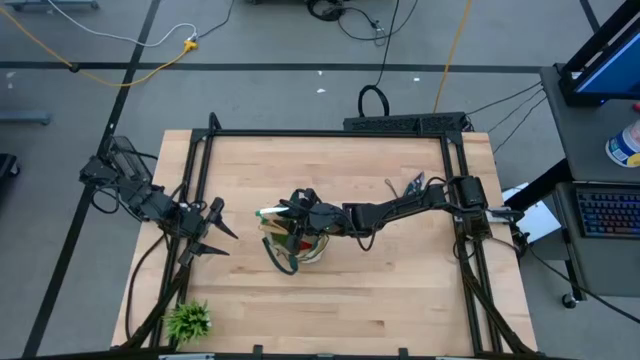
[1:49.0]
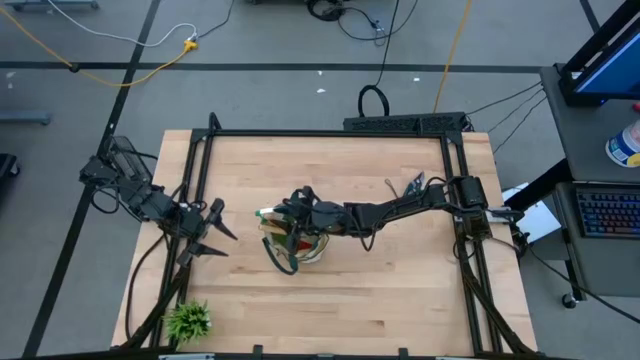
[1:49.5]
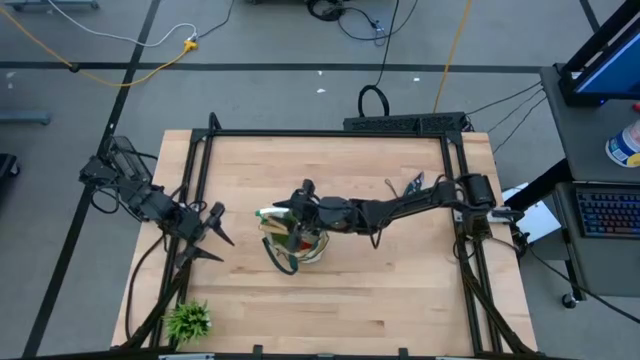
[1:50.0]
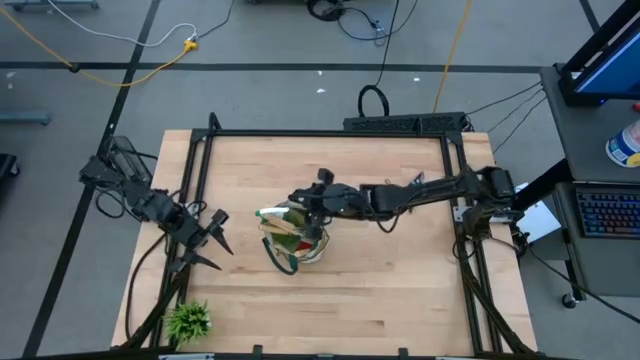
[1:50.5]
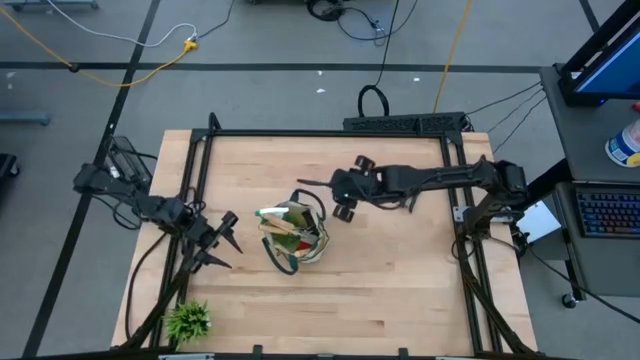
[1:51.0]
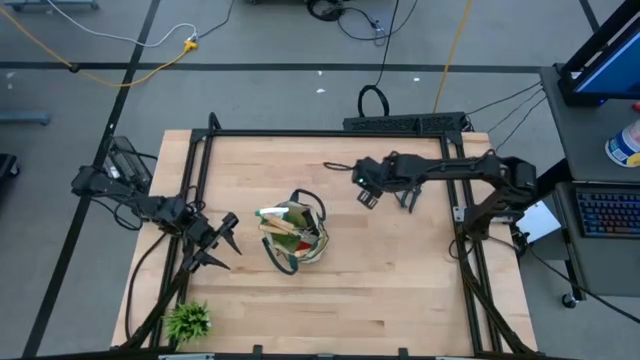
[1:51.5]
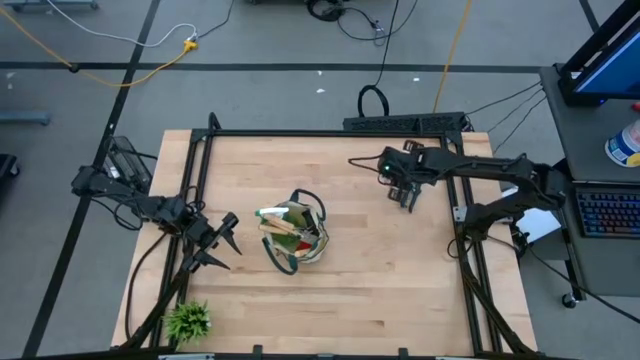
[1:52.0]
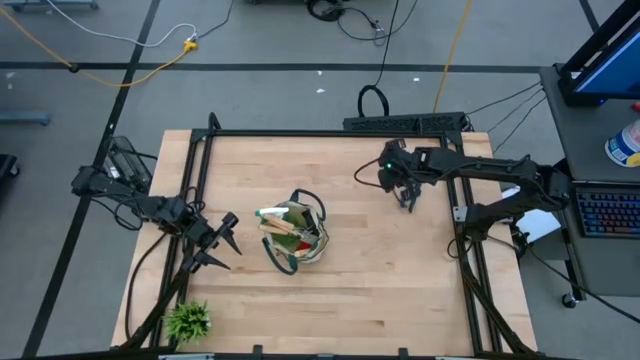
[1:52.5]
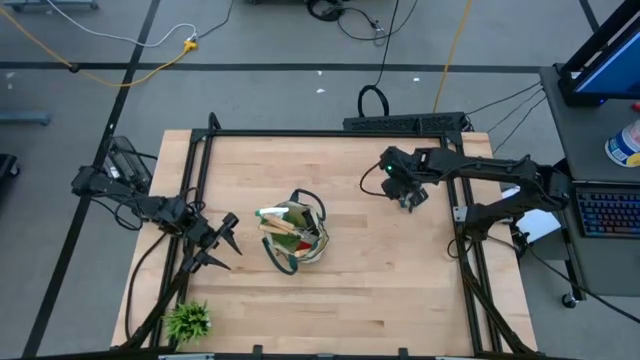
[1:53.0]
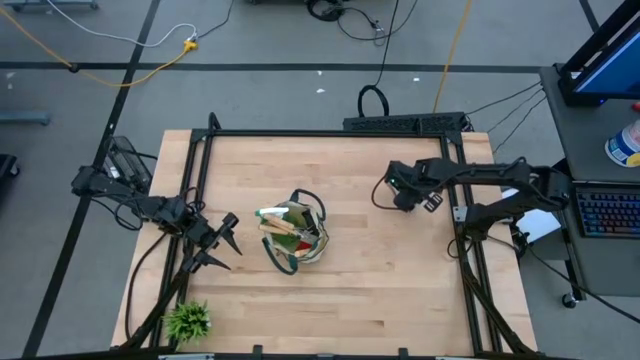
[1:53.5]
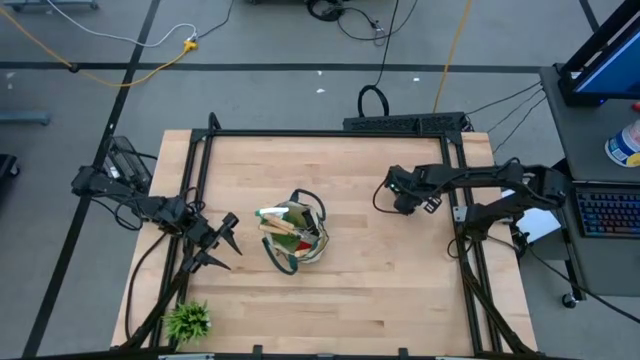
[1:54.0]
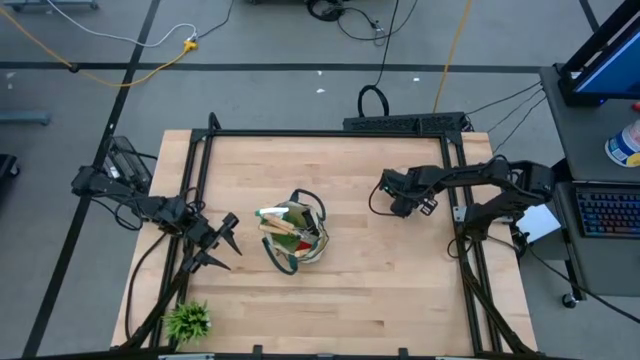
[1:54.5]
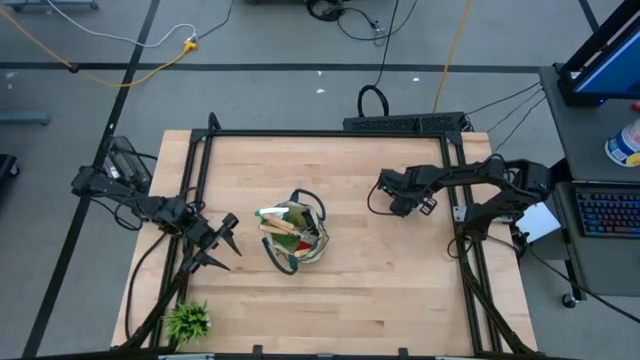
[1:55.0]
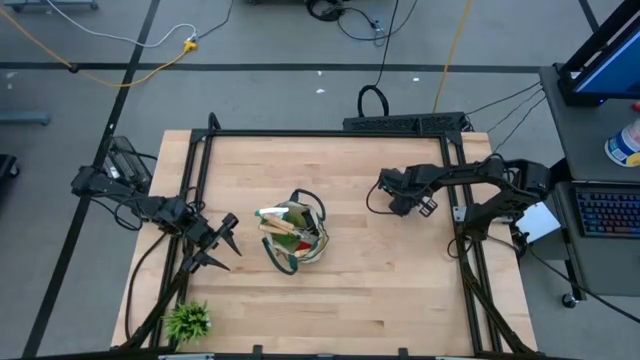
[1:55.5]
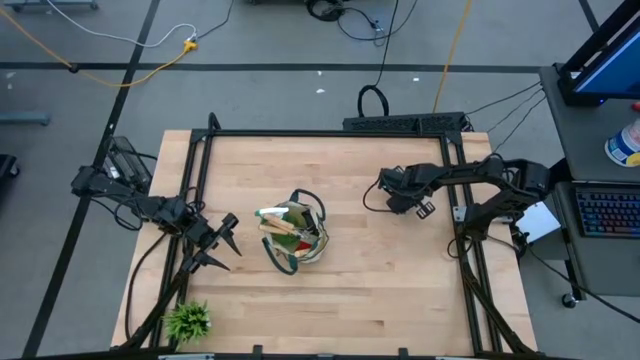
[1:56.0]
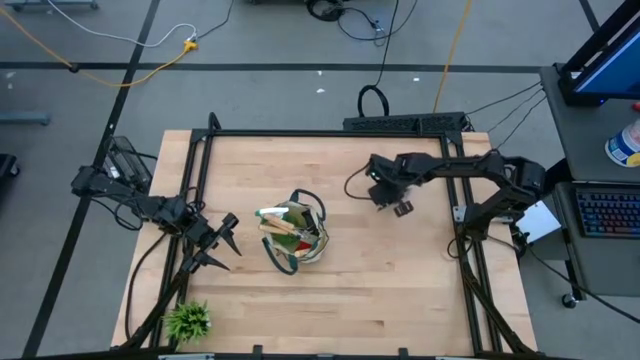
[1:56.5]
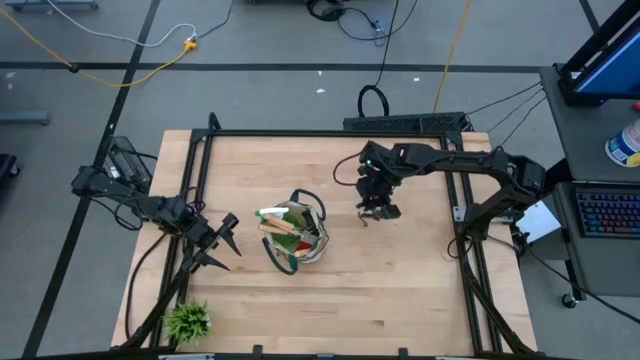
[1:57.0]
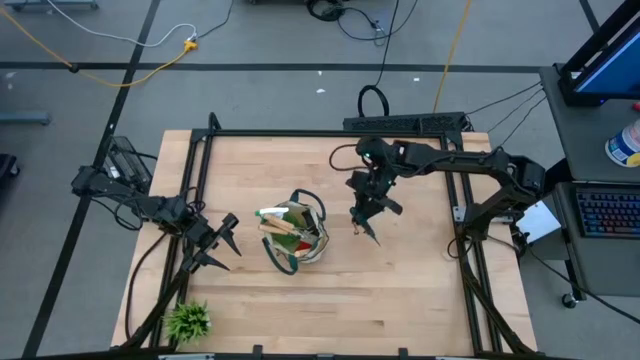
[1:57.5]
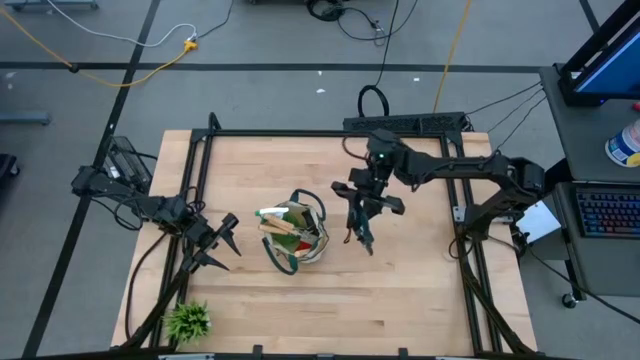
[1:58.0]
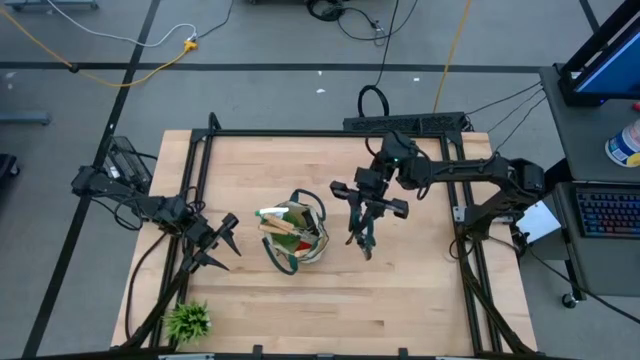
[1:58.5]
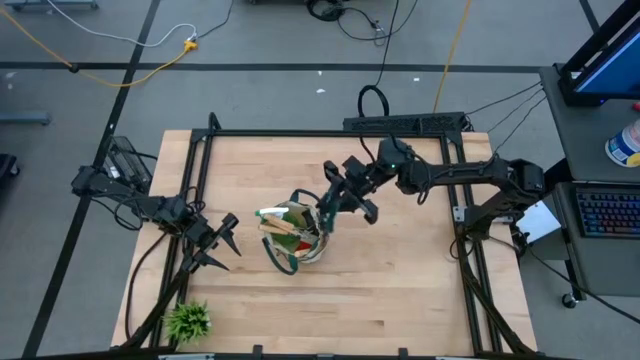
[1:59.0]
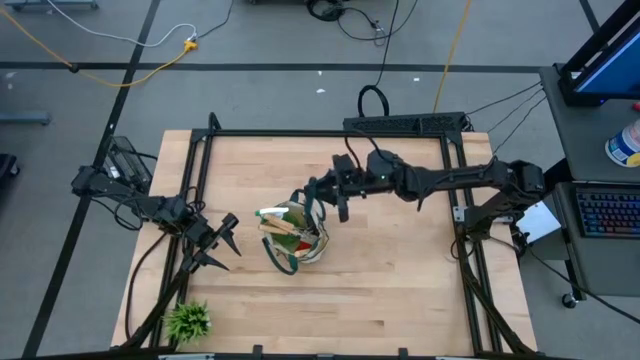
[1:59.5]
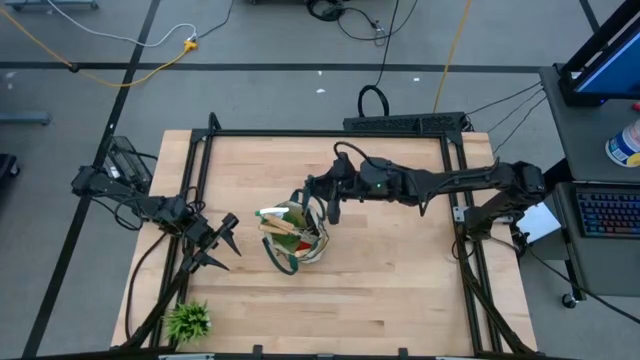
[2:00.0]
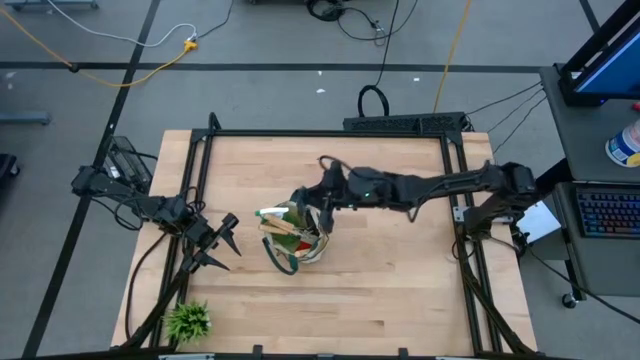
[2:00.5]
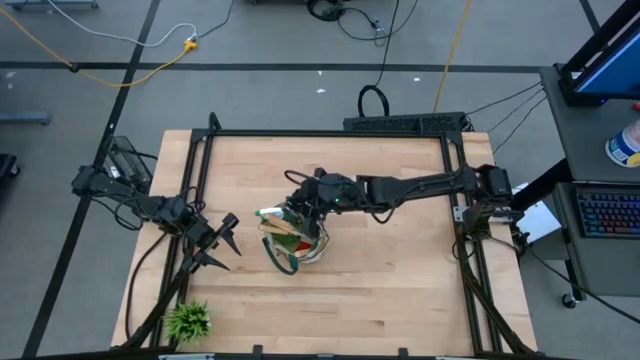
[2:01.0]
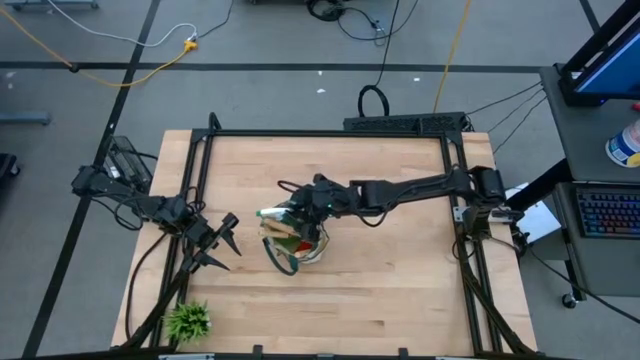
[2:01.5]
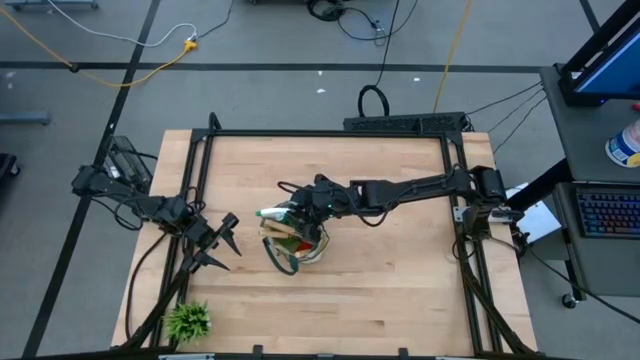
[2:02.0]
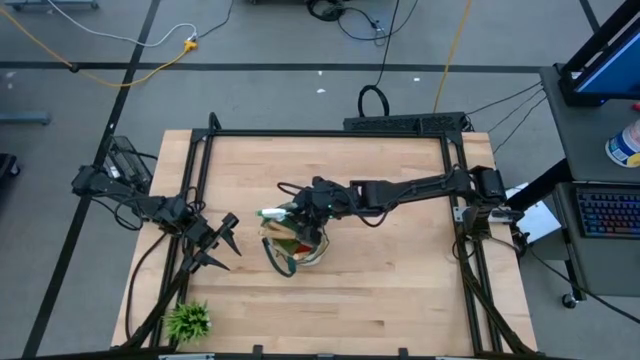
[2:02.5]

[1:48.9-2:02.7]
Task: Pick & Place Garden tools in Gardening bag
Put the shear scissors into the gardening bag

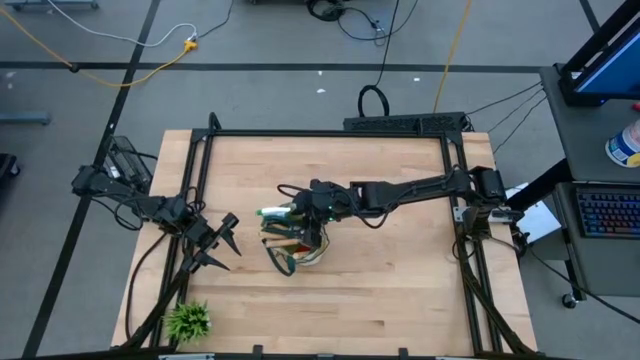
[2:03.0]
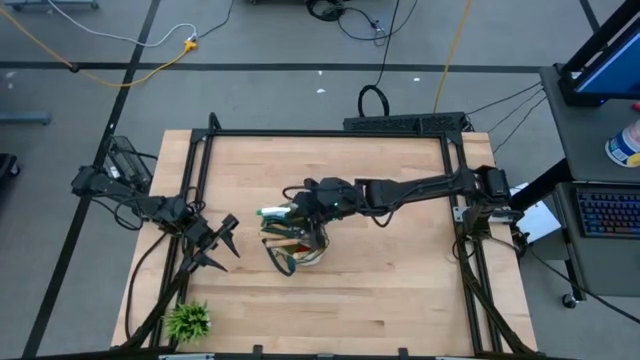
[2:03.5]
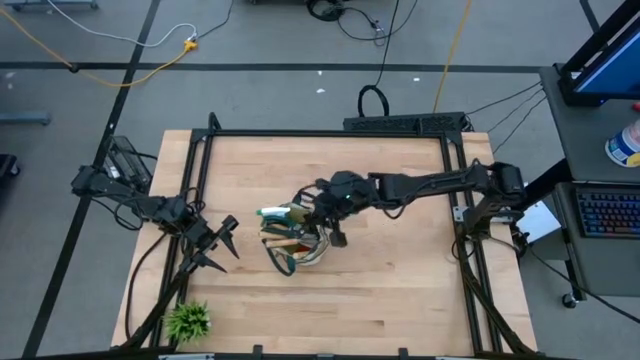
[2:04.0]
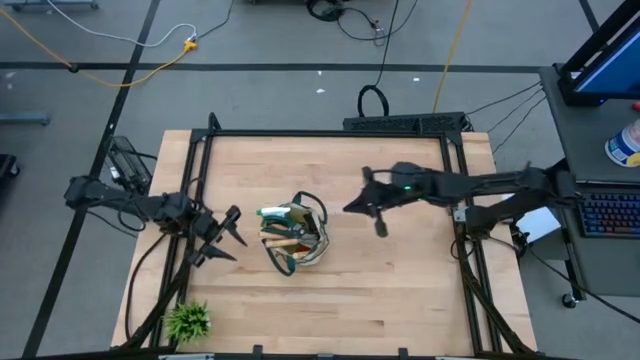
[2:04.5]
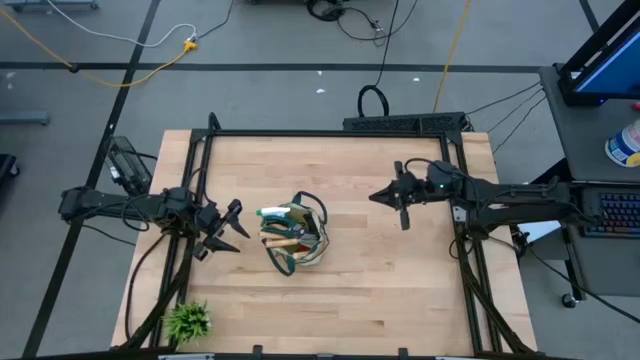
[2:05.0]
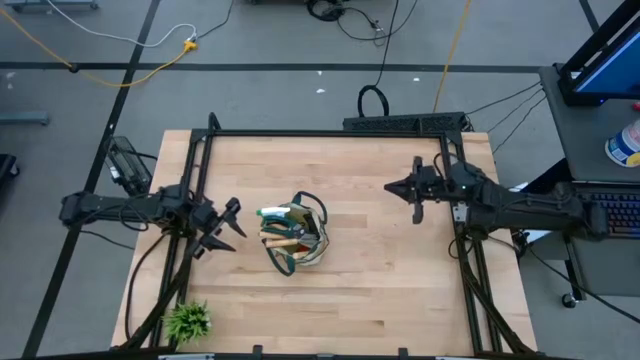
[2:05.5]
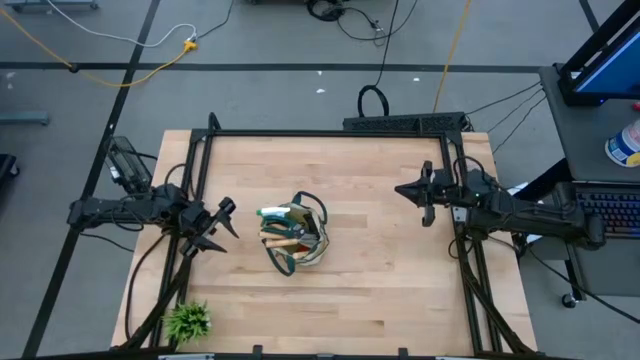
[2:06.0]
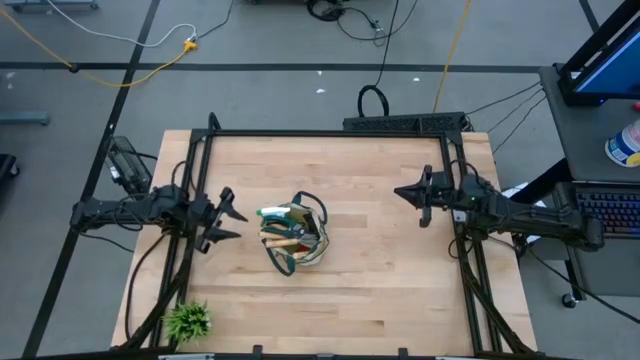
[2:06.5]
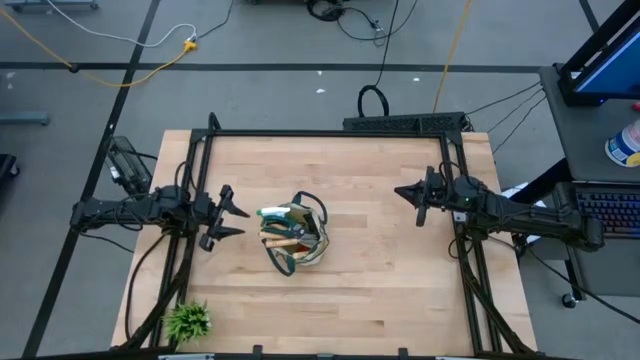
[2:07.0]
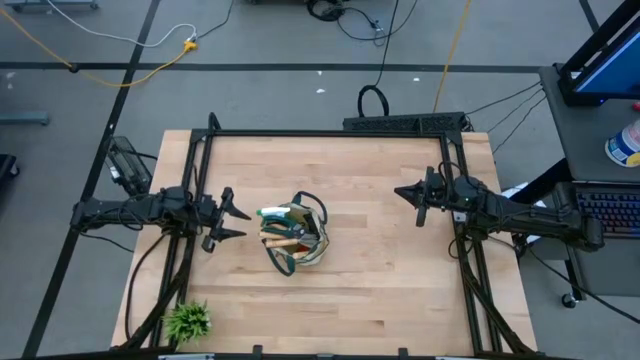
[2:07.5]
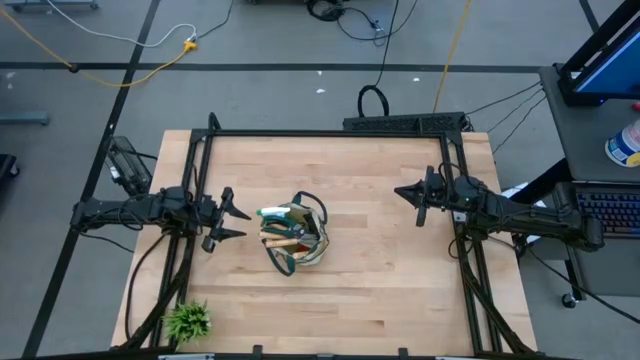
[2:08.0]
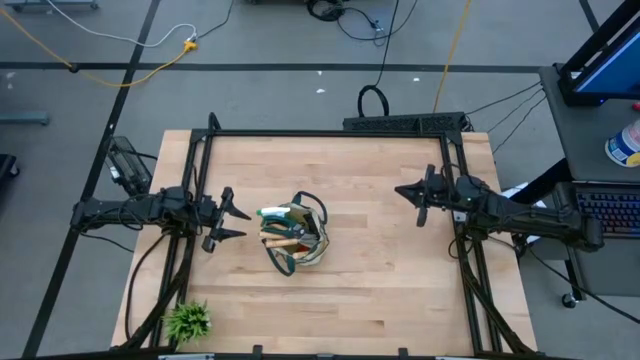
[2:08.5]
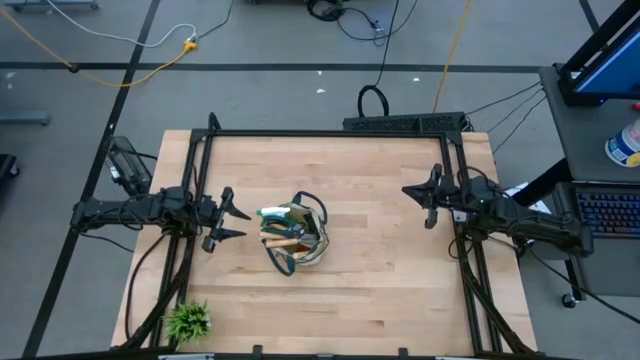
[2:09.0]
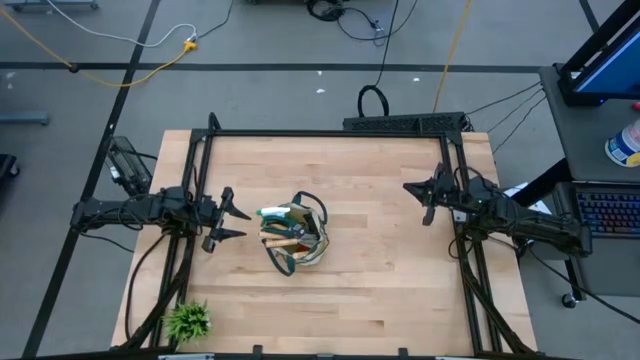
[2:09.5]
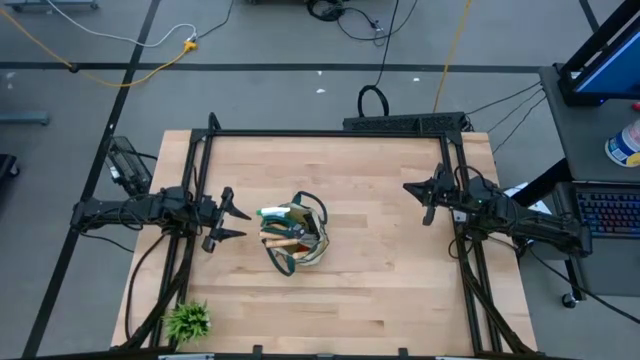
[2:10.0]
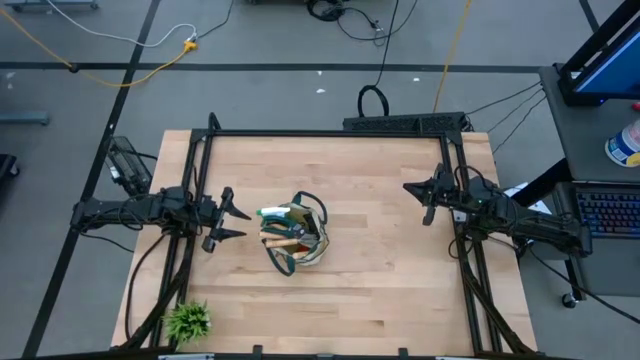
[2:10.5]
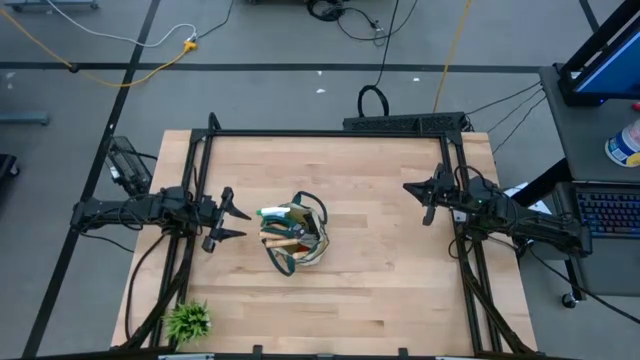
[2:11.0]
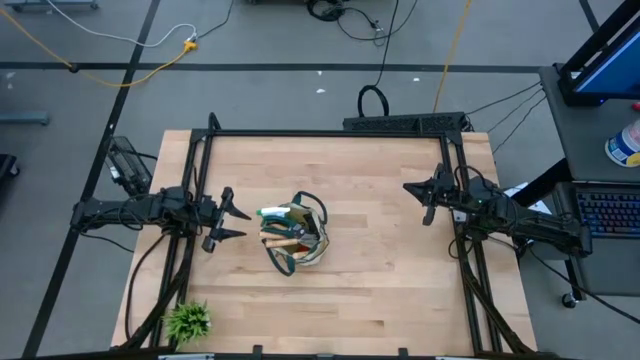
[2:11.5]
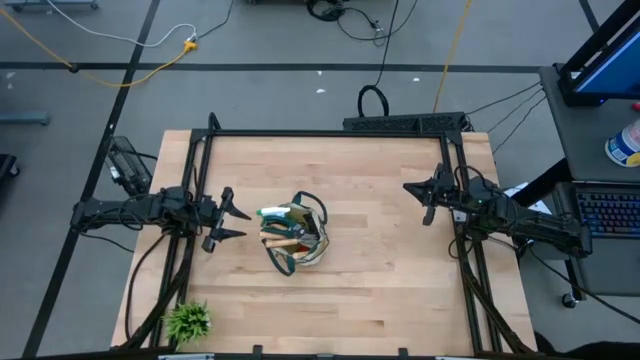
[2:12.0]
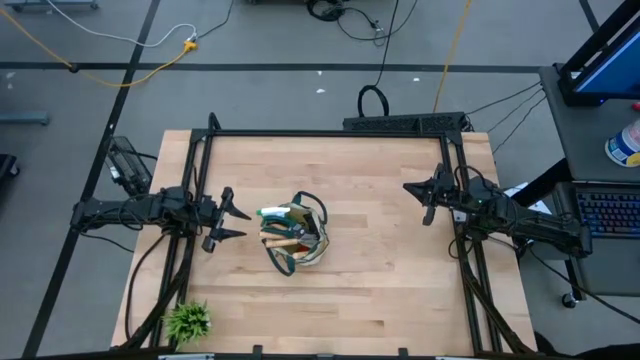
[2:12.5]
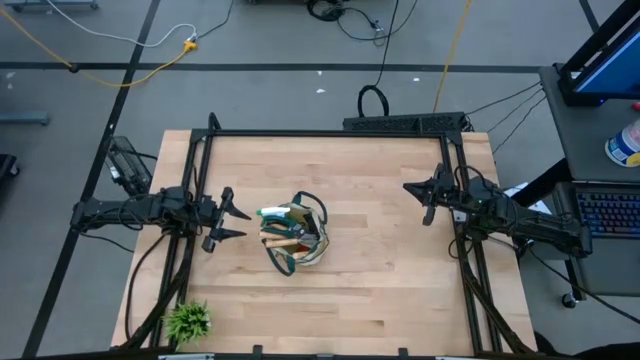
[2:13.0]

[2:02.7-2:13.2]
Return to Home Position
